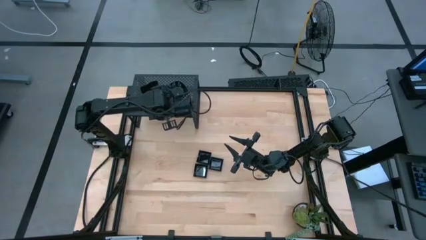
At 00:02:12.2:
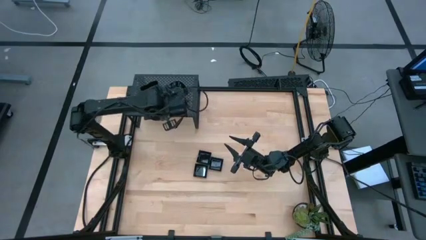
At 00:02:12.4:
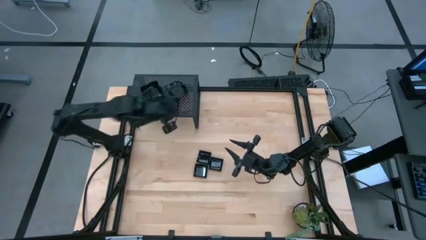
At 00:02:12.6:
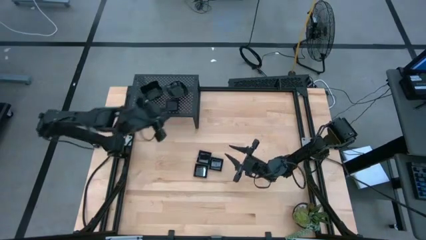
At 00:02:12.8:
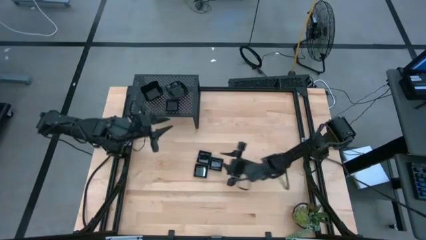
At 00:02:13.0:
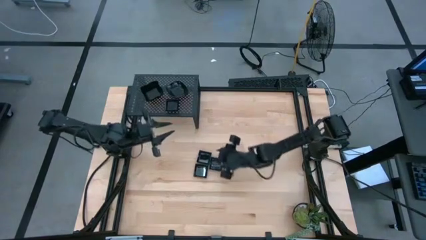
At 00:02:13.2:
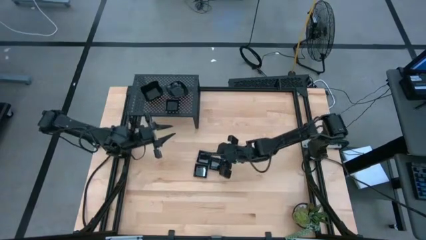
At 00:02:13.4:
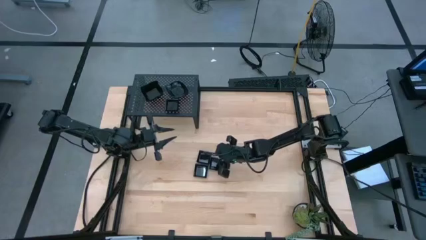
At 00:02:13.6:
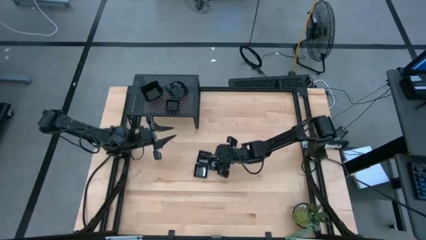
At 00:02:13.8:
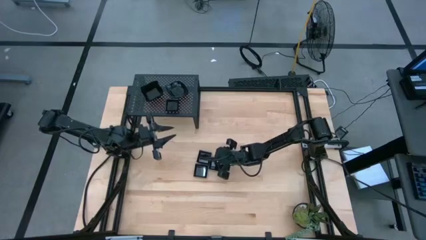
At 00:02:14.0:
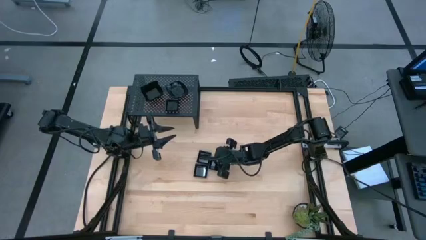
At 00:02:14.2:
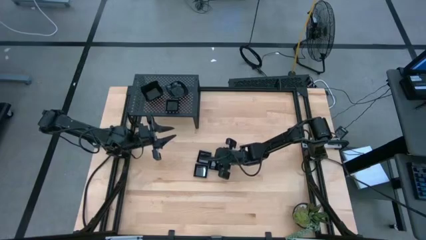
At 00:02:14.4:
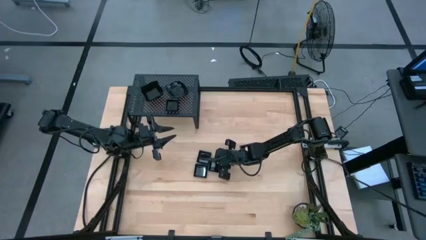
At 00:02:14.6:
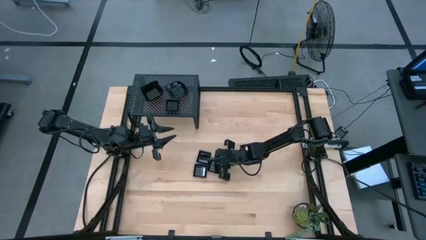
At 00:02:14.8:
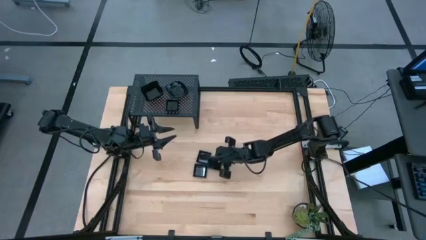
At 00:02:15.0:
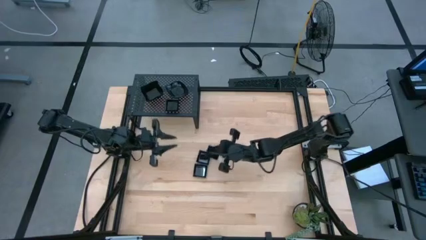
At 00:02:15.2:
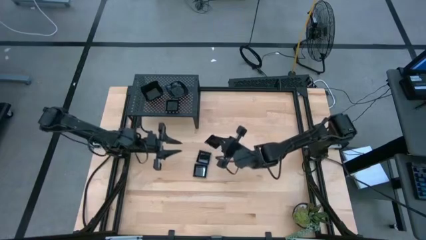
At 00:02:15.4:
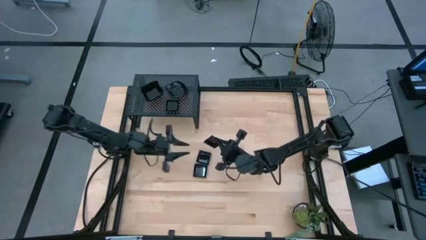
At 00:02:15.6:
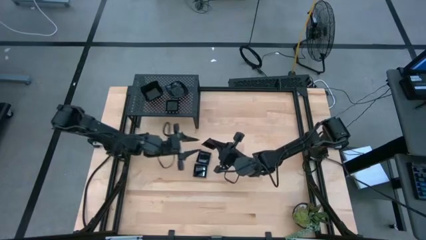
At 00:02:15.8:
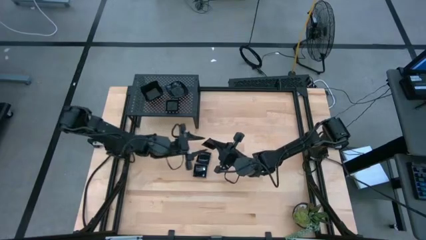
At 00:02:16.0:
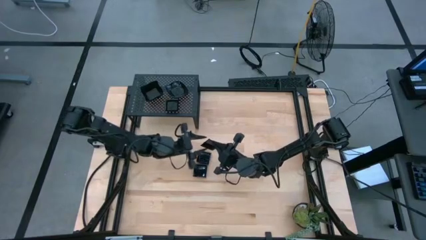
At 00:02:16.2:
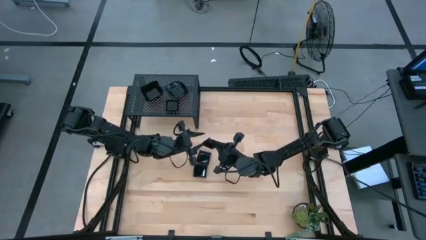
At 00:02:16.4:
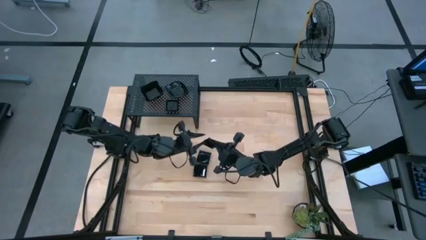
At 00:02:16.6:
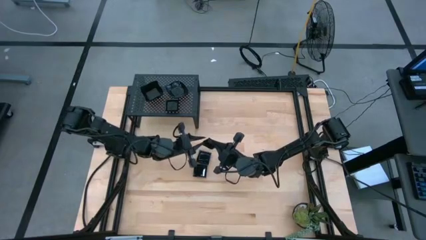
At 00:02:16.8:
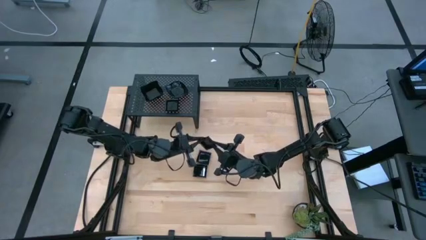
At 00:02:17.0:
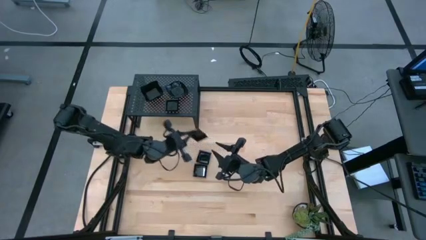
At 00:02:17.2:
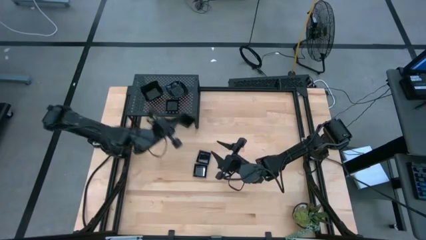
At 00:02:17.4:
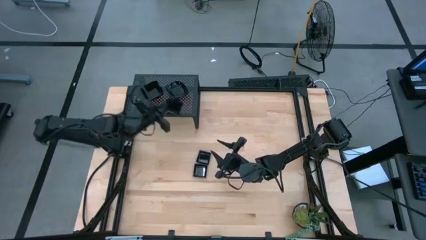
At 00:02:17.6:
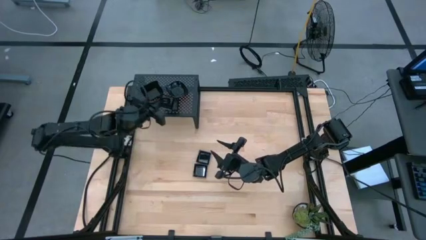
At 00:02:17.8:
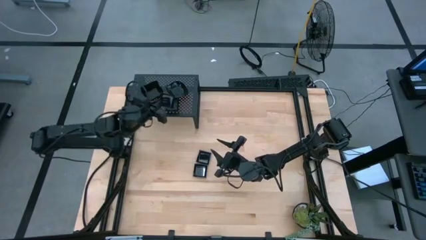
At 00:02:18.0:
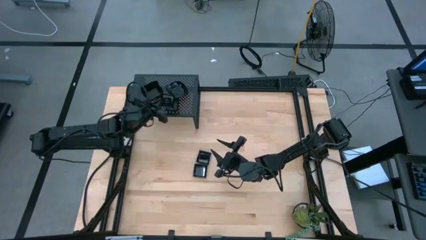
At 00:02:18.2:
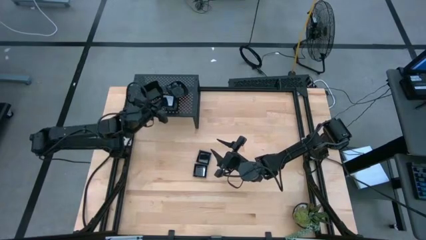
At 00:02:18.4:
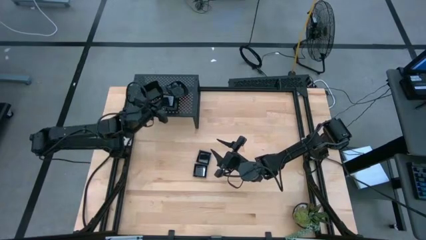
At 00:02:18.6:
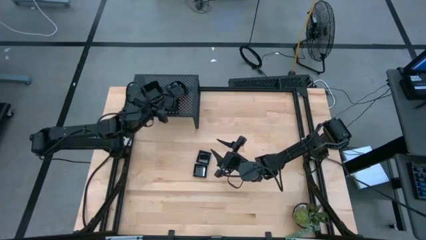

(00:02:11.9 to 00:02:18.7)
Task: Pick & Place Mini shaped plates
Stack the square plate on top of the square plate on the shelf

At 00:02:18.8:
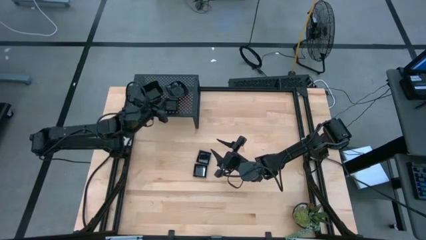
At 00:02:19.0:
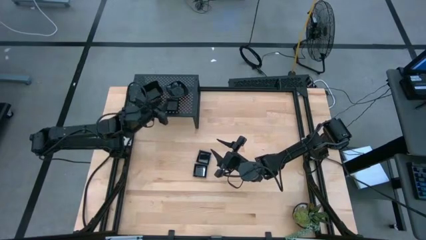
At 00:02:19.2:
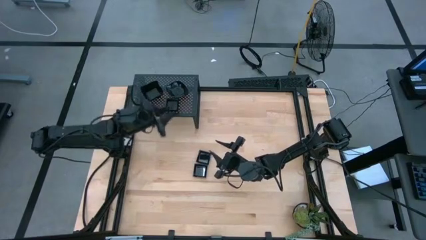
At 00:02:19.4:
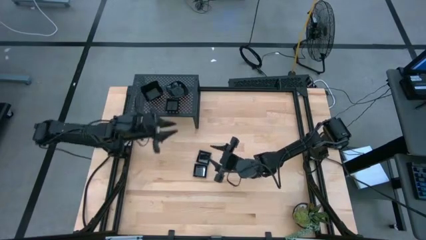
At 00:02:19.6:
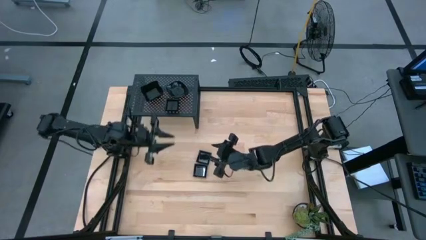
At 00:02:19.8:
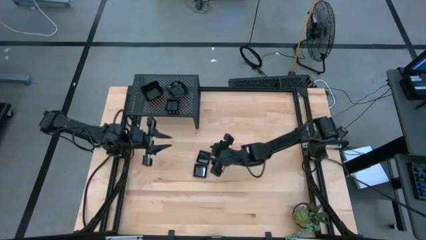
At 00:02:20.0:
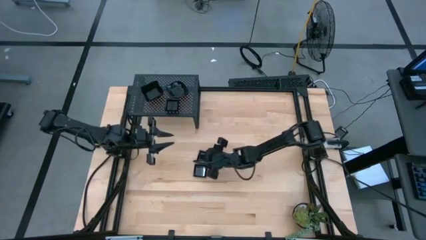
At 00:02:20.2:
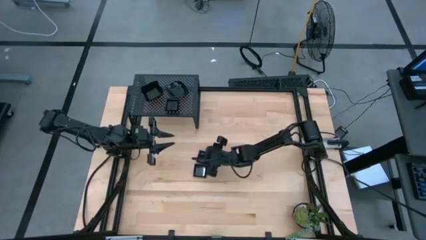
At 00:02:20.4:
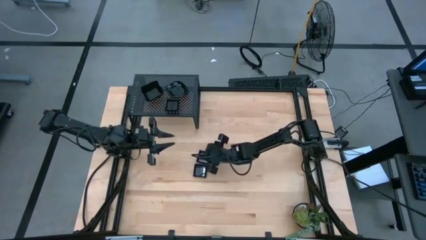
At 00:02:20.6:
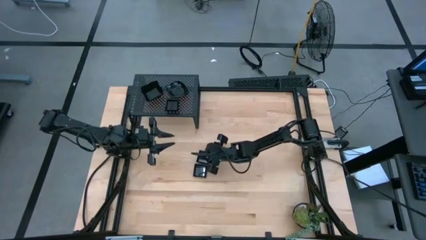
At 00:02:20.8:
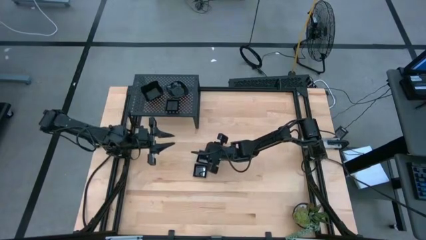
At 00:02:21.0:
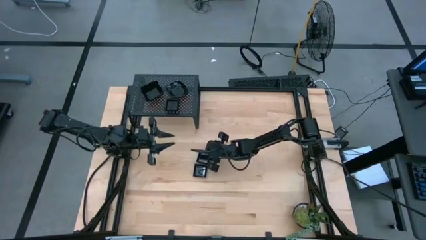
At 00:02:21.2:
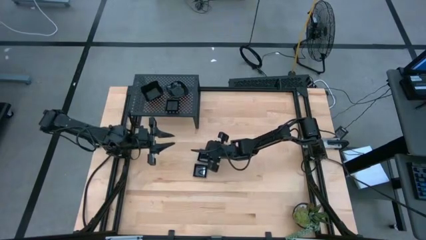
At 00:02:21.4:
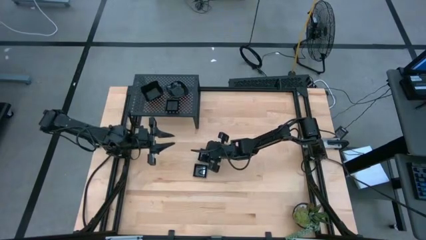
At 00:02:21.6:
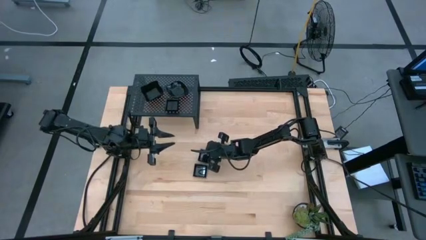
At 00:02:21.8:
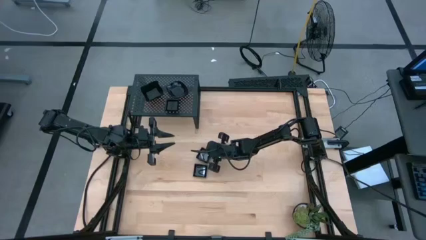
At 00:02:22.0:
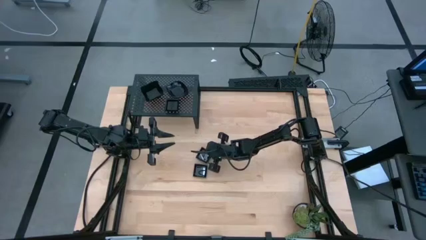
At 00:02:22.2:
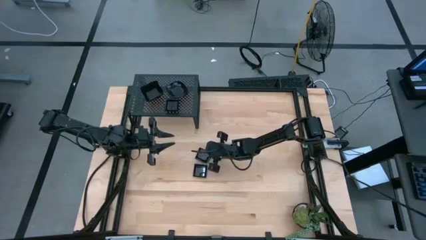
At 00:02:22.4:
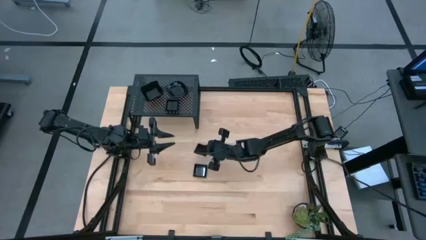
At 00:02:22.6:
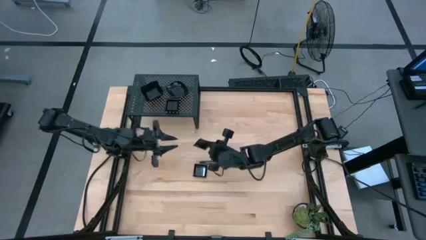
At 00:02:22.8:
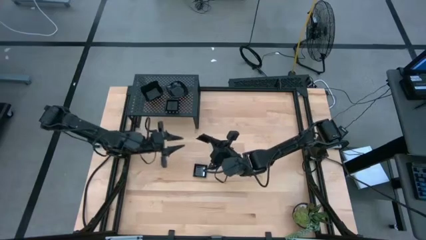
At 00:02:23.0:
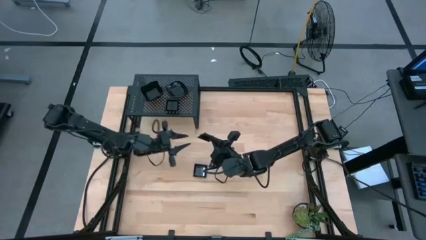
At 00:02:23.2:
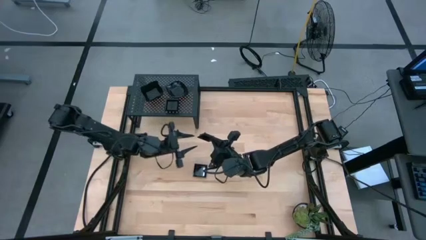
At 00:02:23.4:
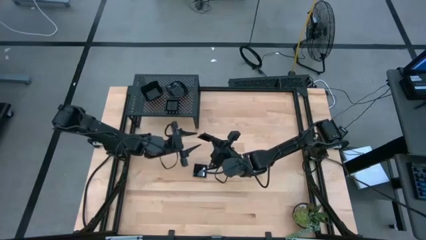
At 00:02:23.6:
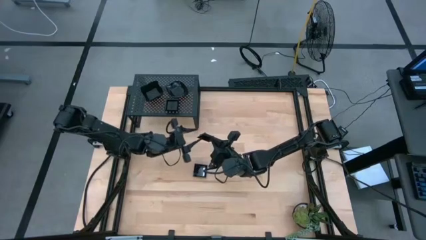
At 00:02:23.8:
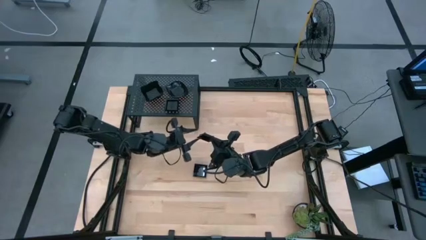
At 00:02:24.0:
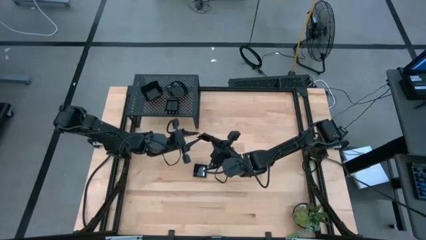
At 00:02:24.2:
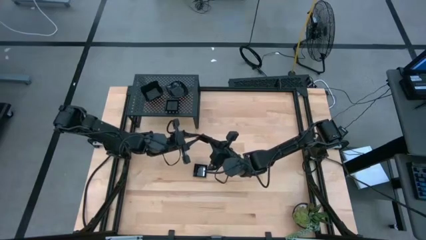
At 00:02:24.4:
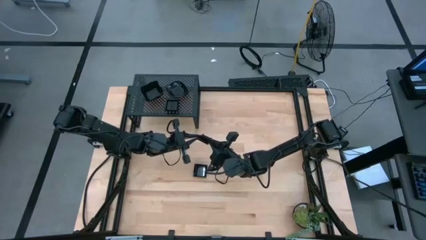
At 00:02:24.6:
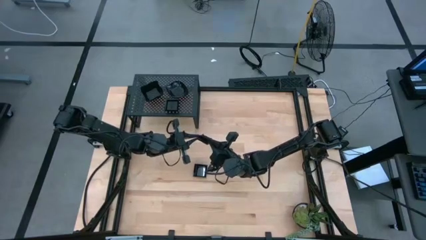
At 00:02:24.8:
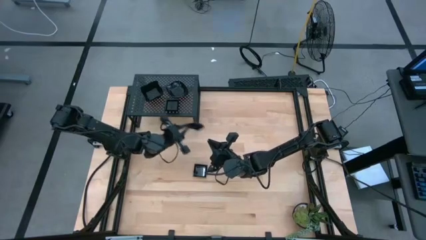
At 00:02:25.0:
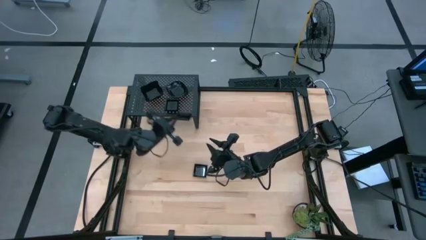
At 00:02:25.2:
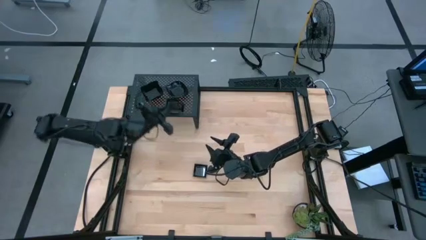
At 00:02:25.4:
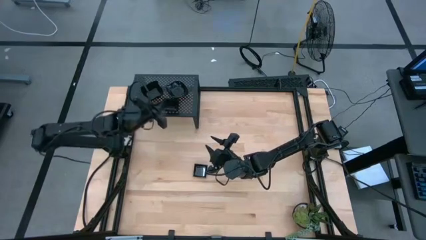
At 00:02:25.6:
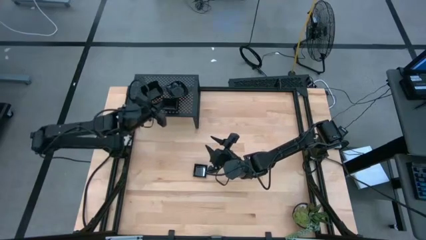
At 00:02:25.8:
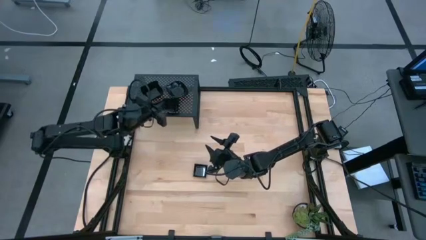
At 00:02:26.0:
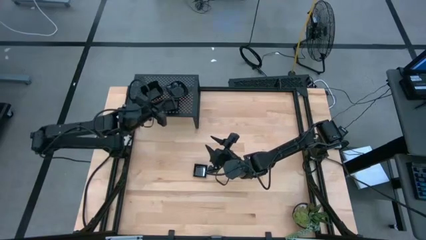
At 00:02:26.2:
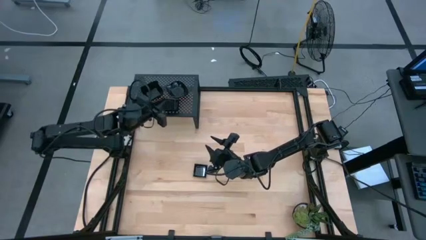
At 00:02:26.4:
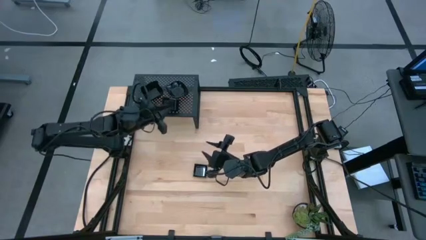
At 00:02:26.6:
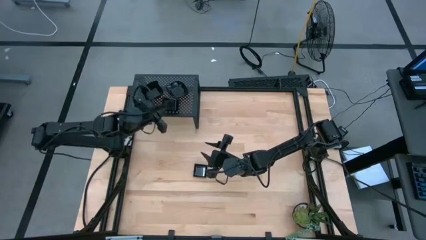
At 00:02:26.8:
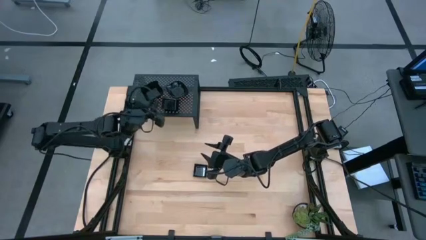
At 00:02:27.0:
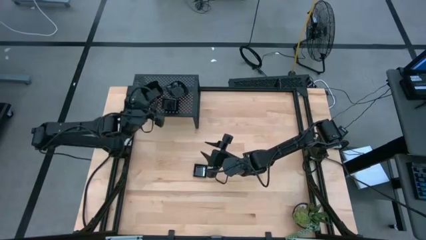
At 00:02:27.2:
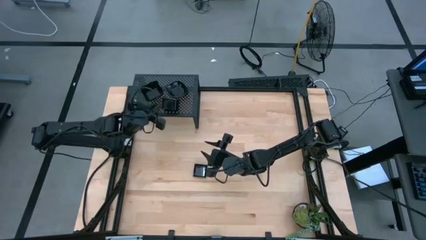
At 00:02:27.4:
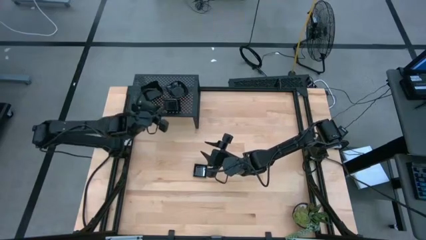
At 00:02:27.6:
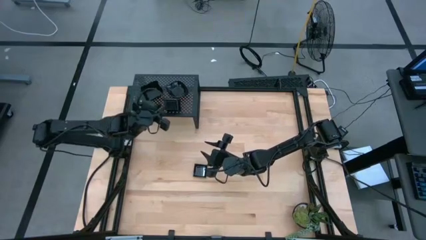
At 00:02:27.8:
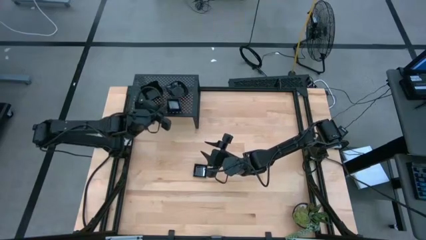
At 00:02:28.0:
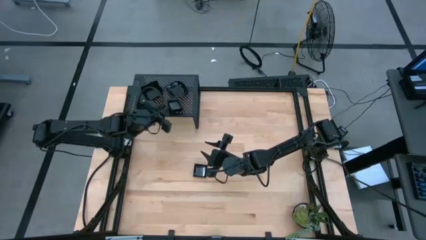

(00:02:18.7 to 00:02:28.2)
Stack the square plate on top of the square plate on the shelf
